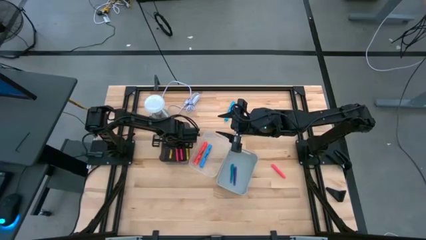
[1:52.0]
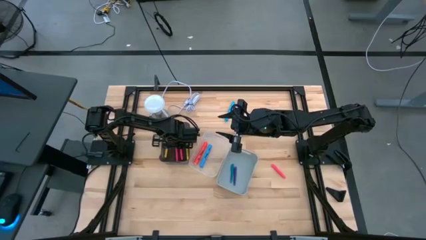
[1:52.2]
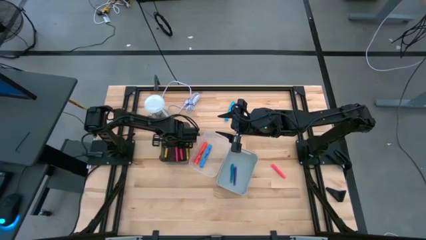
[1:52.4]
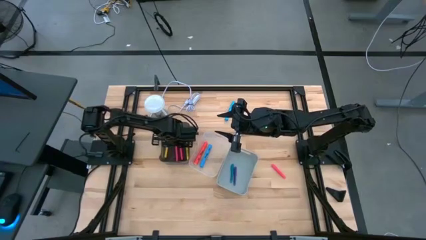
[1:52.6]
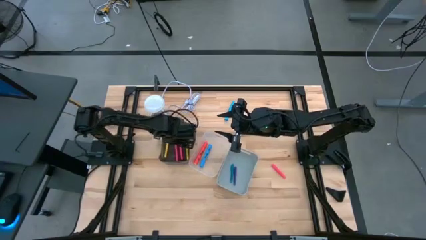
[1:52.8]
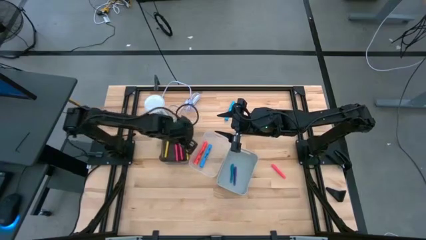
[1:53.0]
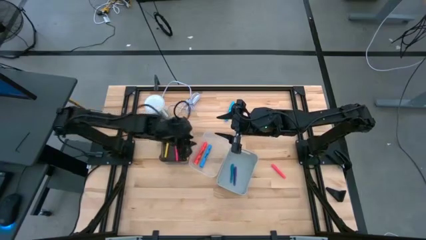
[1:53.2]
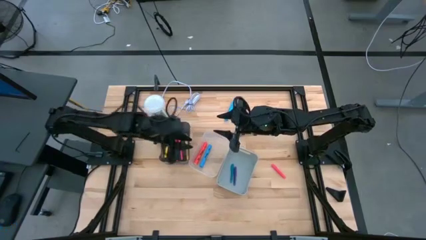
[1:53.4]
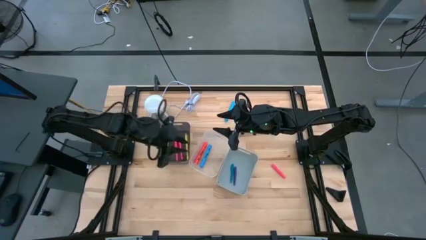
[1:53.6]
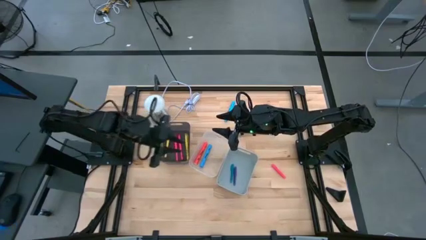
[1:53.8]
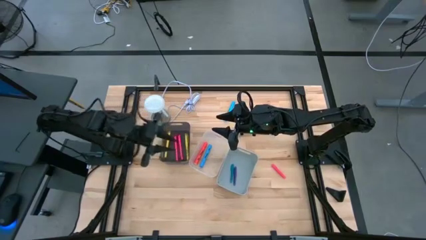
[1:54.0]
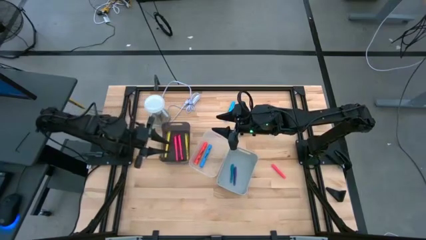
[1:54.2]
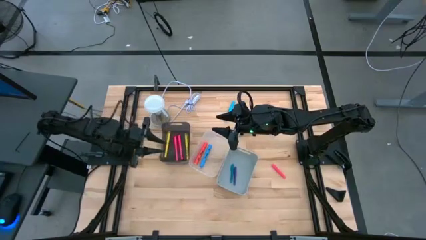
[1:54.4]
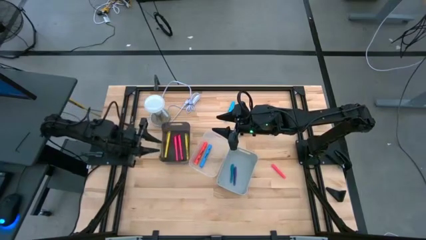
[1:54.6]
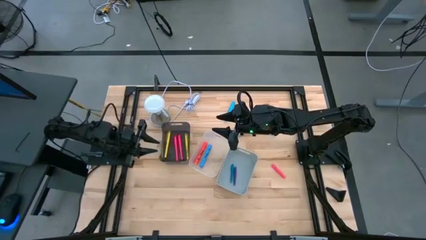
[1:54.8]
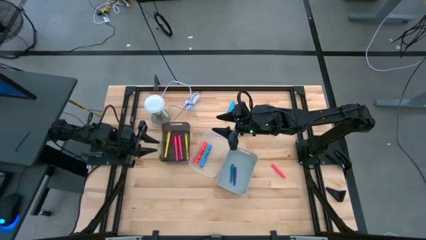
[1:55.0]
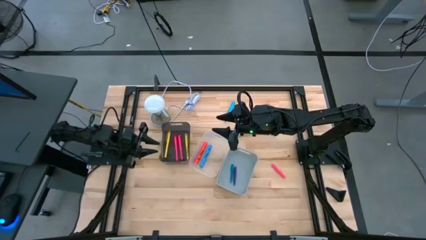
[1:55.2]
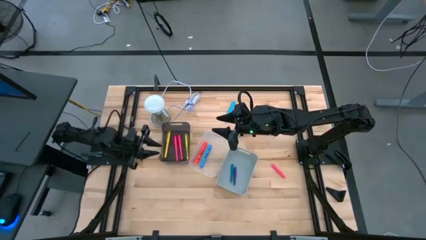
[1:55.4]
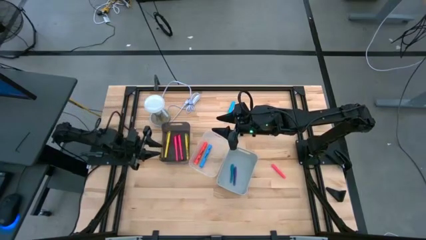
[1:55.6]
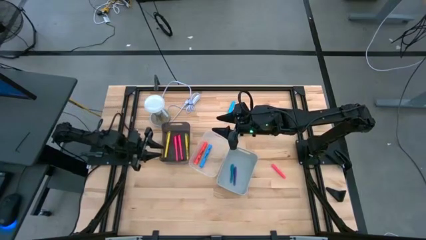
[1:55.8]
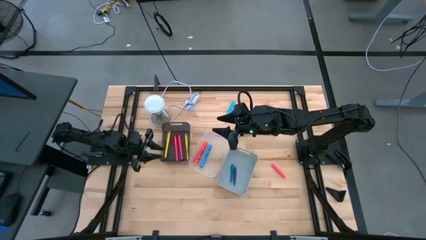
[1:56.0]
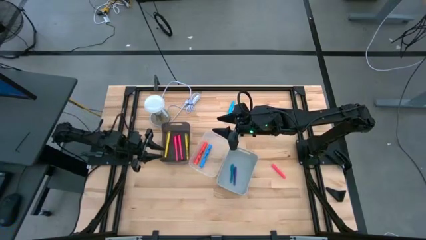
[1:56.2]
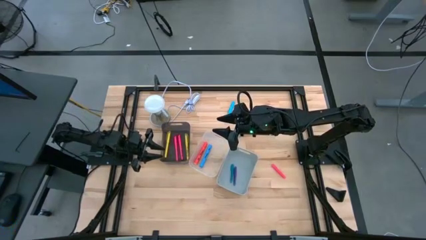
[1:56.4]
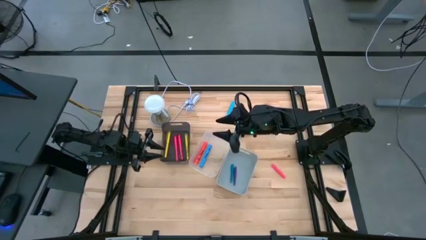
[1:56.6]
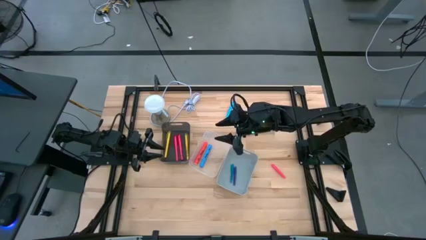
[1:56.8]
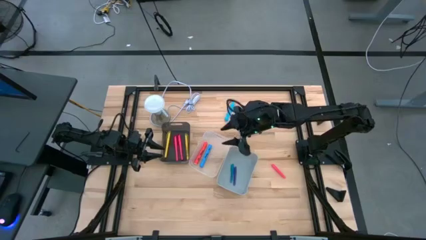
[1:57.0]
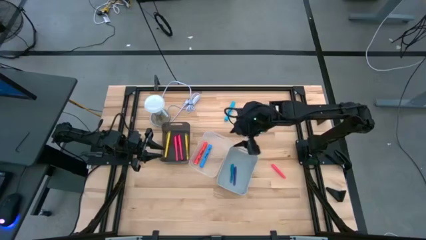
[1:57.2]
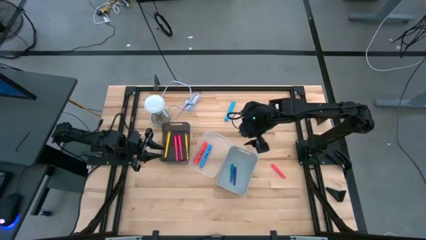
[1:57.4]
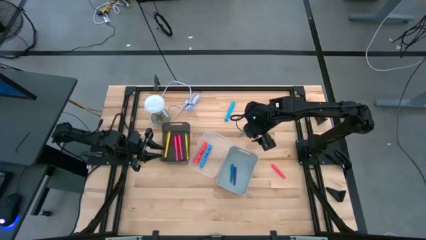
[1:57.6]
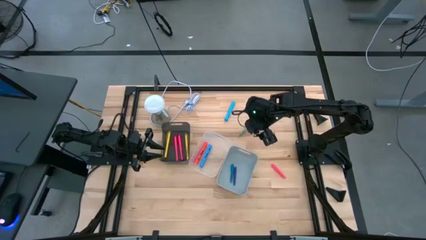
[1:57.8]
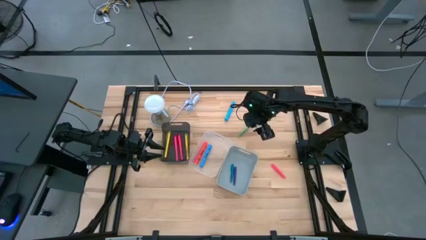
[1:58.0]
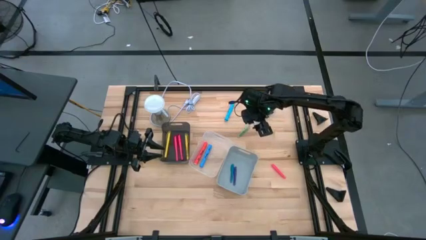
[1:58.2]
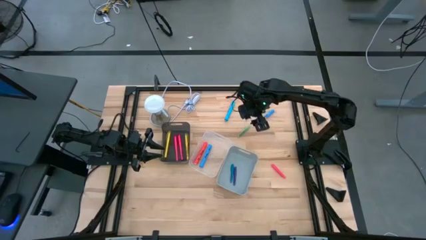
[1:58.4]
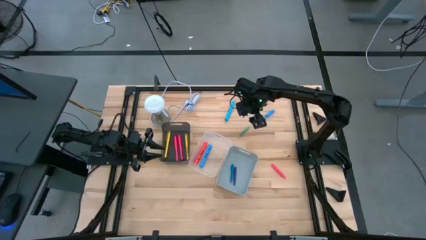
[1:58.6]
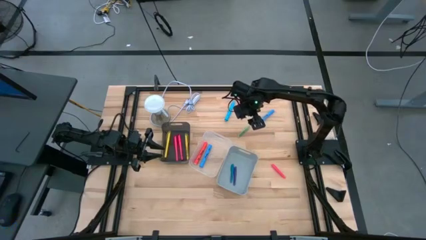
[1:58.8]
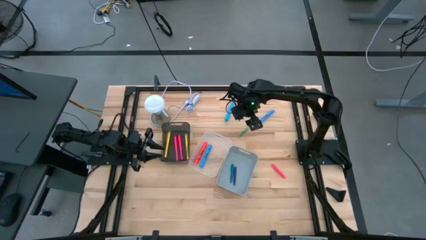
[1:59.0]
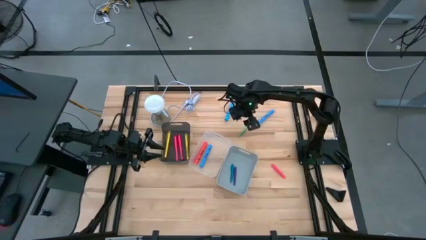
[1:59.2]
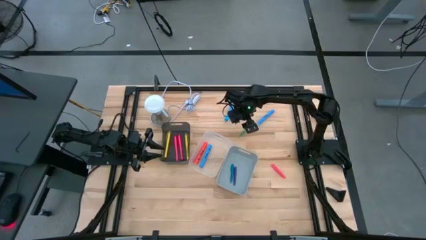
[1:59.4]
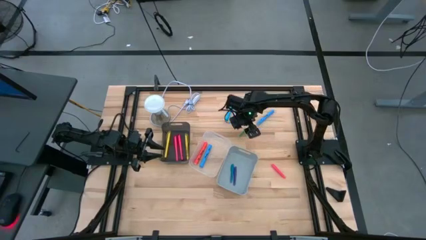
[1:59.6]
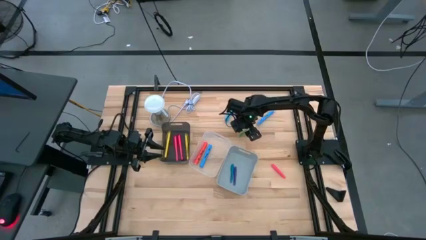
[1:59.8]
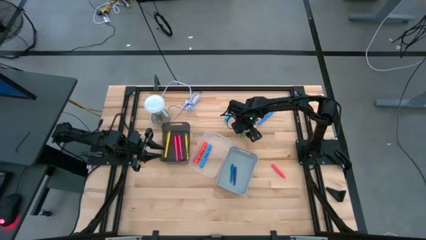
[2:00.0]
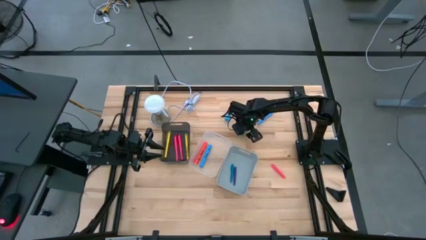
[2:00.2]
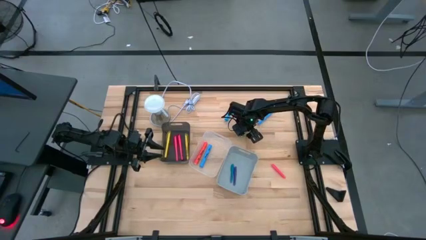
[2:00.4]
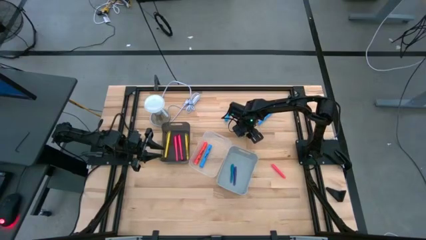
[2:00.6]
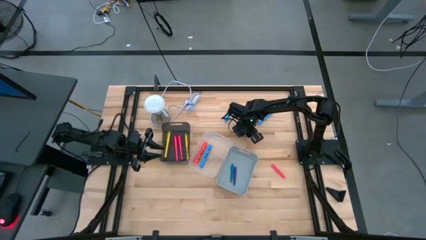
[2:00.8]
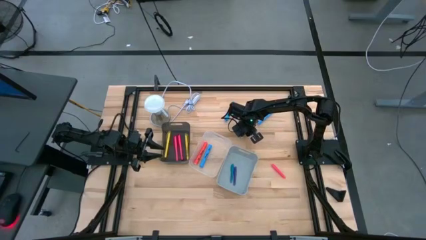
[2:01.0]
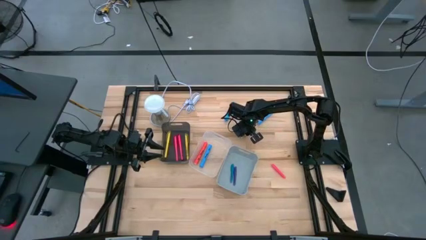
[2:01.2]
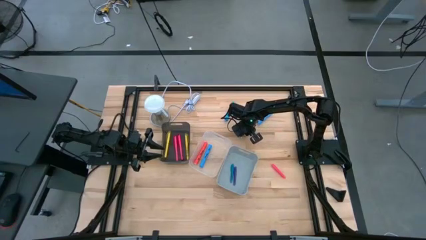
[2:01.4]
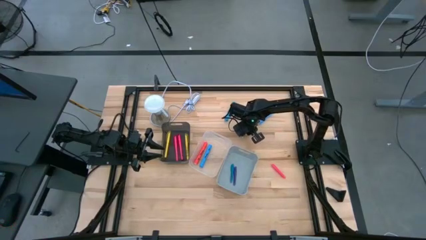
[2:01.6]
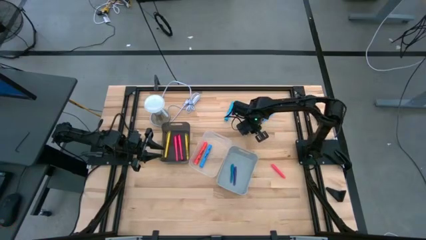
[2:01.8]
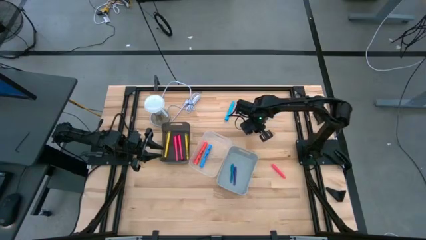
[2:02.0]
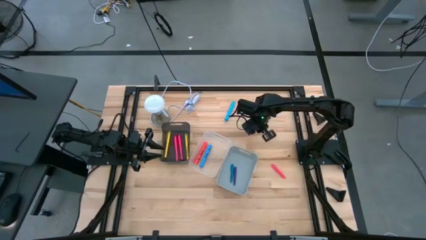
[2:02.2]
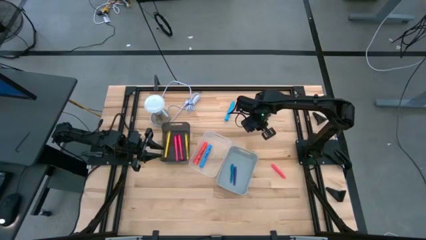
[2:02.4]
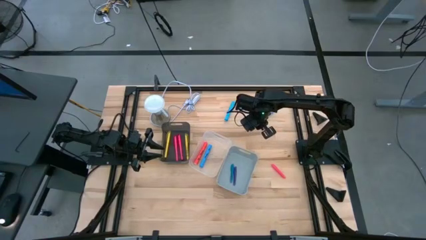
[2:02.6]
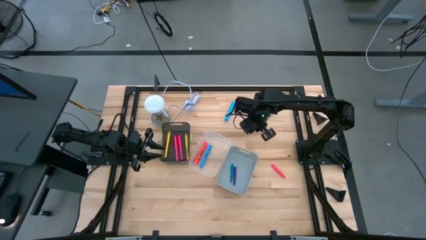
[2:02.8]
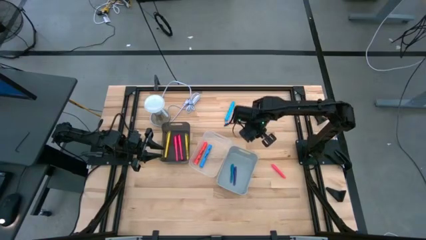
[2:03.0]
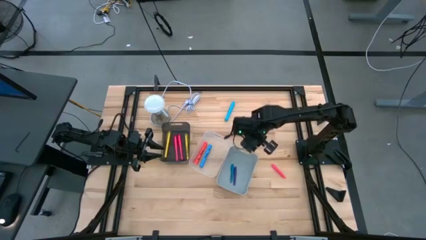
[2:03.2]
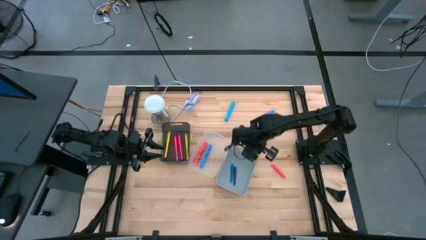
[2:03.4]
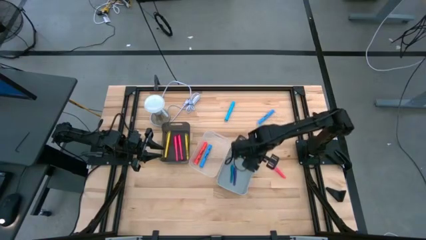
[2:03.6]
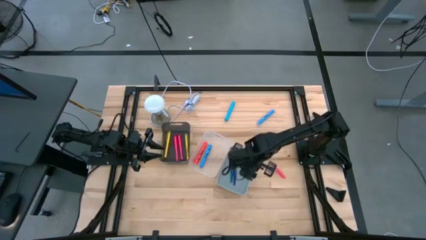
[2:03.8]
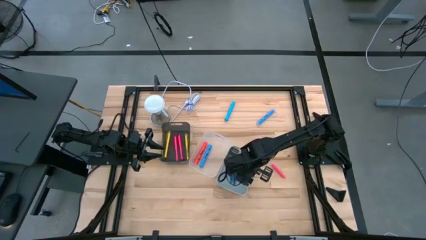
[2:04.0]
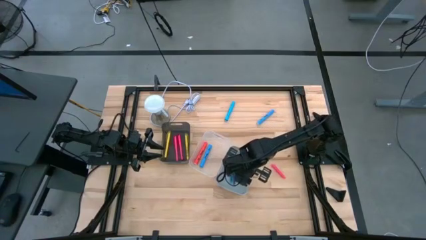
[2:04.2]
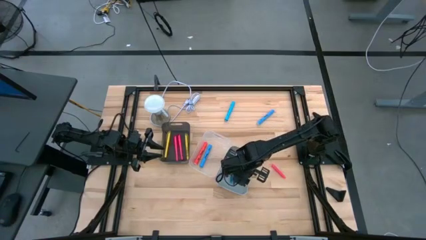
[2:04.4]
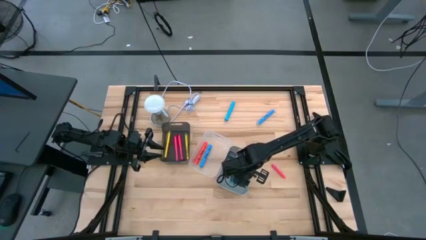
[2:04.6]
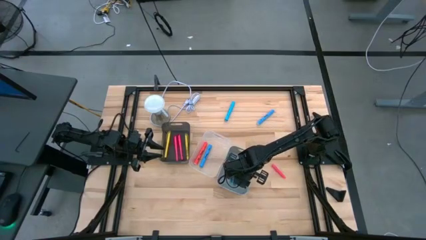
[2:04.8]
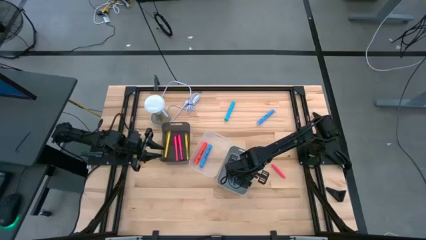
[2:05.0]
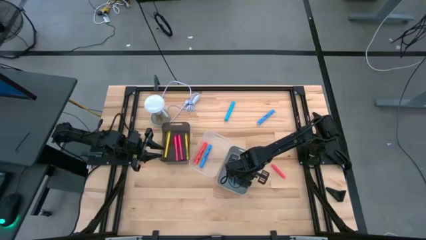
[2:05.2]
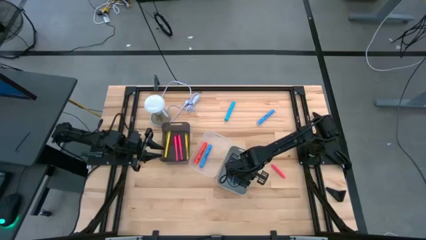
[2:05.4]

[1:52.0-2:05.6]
Task: Pick & Place Markers
Put the green pen into the gray bin

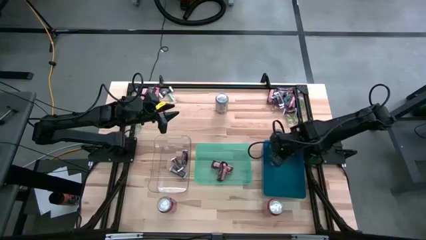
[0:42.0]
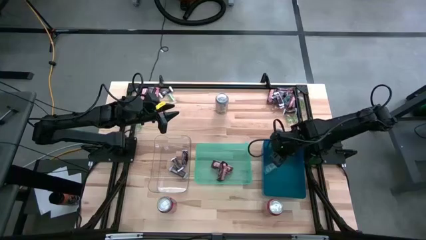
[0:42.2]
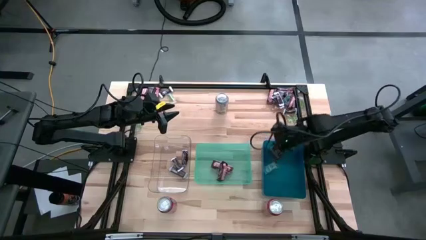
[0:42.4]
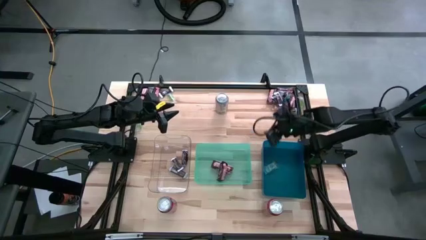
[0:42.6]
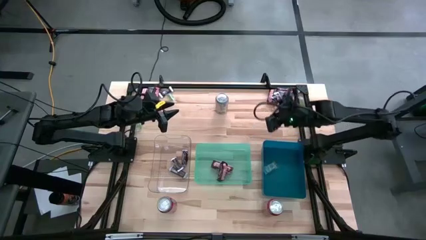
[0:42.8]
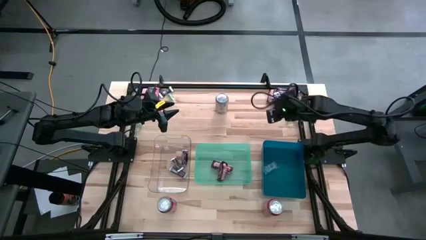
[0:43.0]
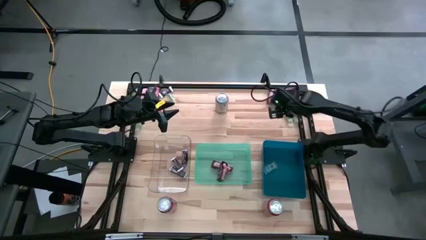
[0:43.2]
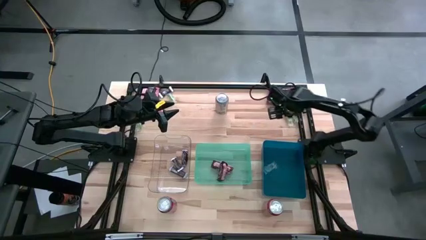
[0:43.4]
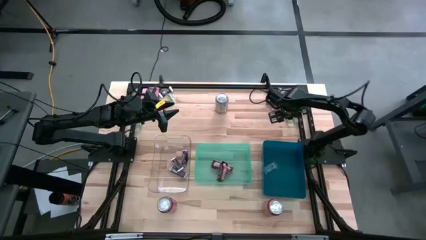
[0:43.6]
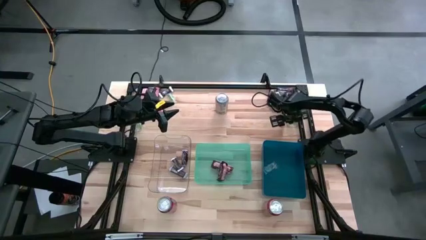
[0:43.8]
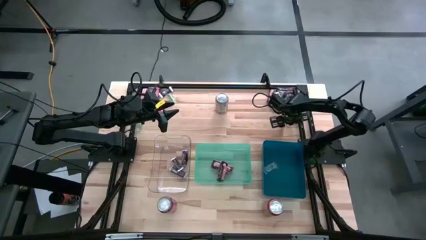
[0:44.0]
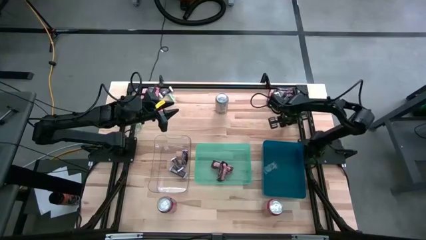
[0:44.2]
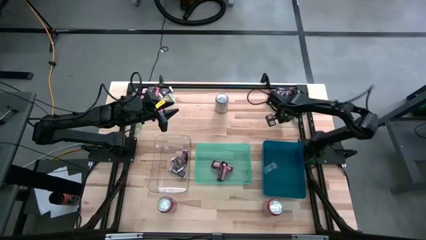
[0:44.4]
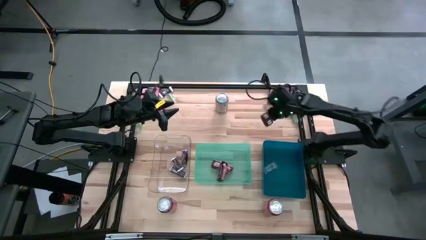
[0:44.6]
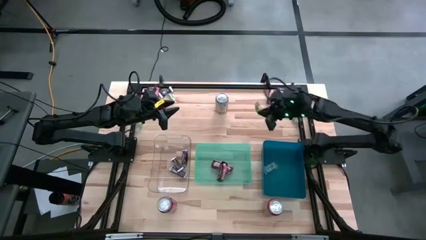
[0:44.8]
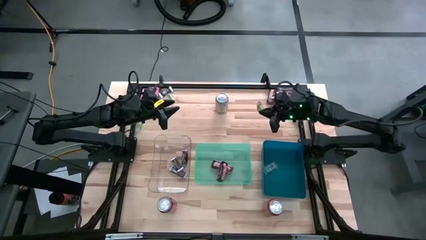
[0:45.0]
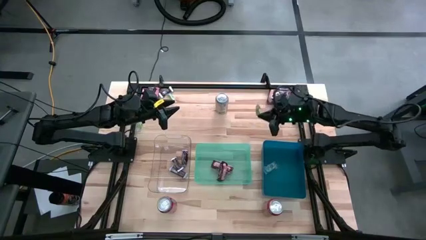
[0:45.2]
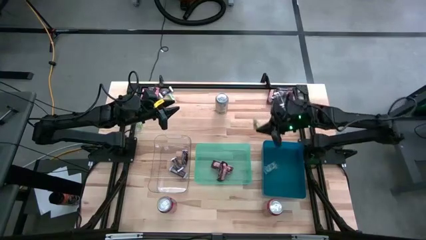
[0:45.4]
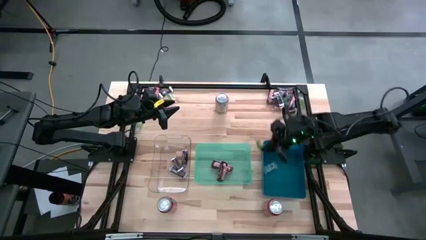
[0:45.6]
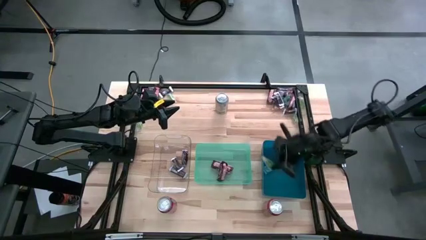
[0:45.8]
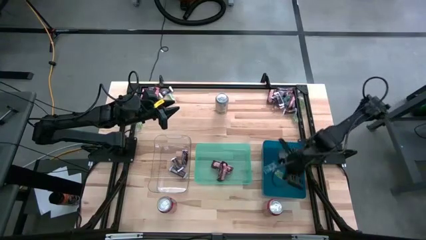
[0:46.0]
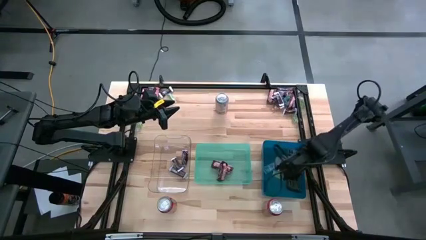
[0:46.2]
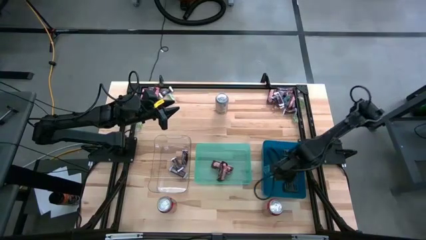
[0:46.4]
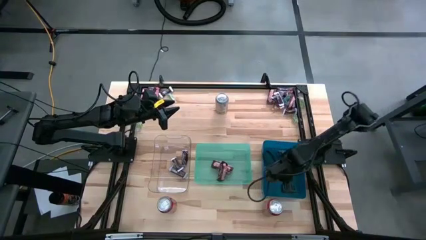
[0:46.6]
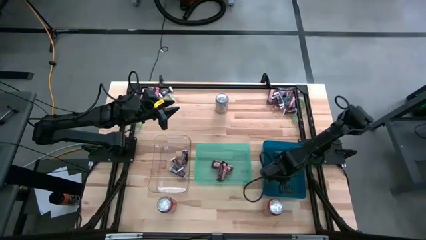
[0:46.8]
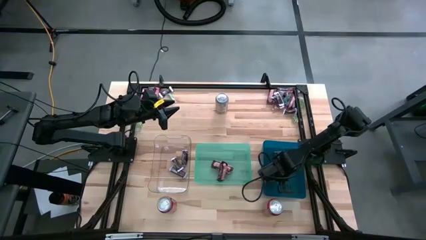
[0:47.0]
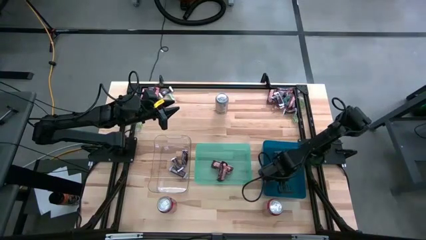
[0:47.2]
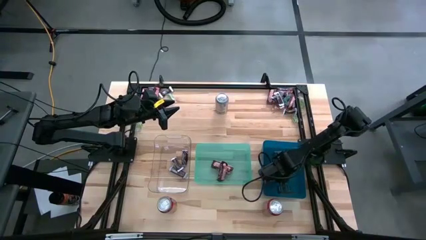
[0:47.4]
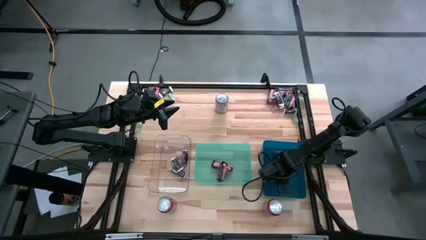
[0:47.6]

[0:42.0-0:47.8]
Task: Organize candy in baskets
Put the green gummy into the blue bin
